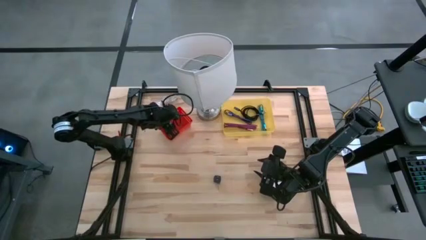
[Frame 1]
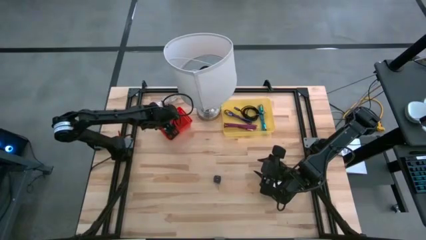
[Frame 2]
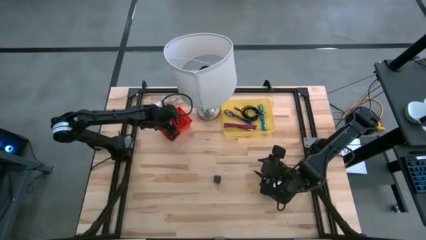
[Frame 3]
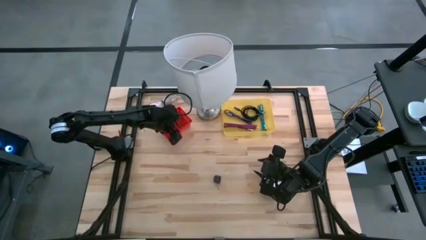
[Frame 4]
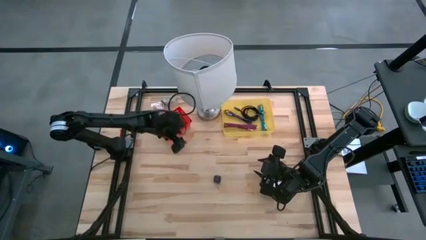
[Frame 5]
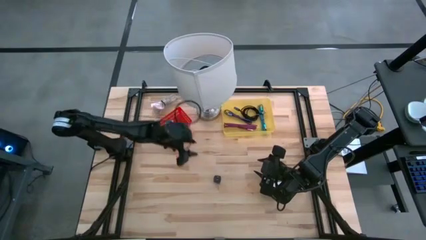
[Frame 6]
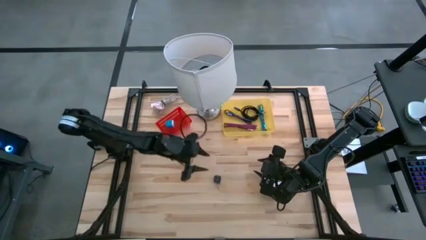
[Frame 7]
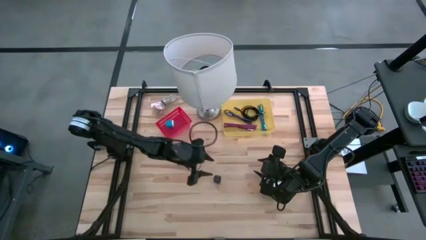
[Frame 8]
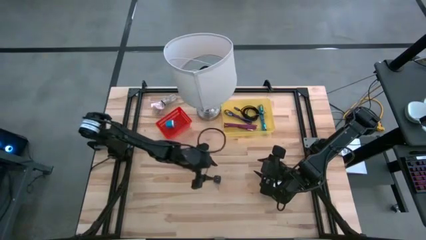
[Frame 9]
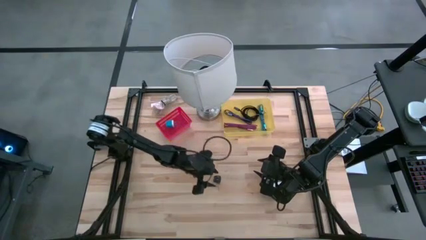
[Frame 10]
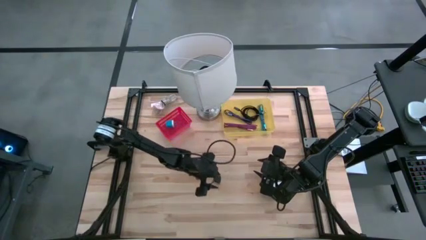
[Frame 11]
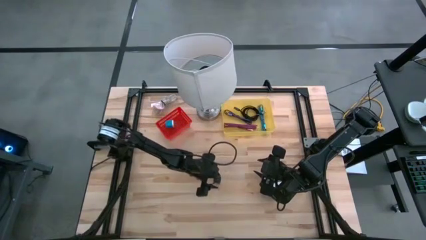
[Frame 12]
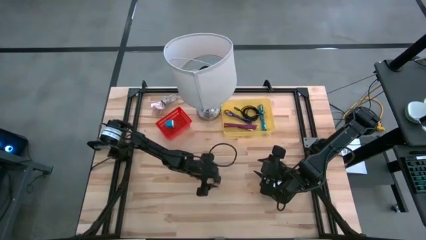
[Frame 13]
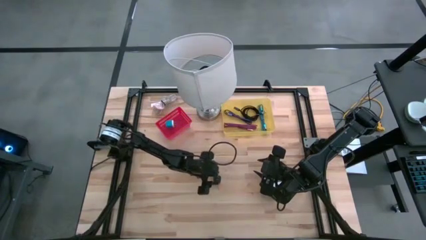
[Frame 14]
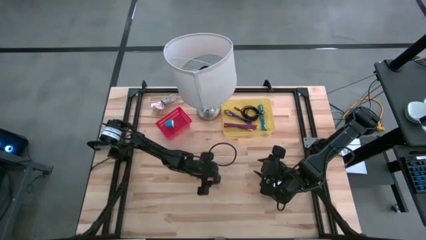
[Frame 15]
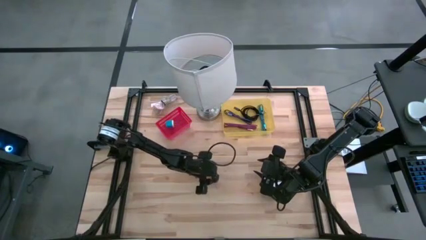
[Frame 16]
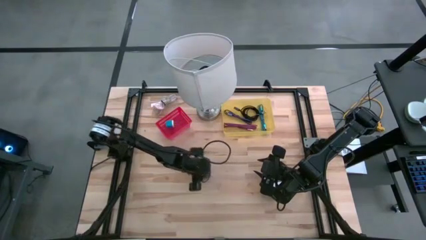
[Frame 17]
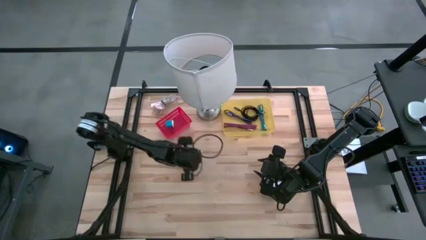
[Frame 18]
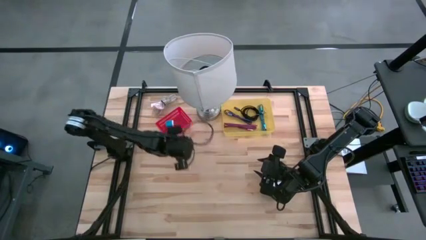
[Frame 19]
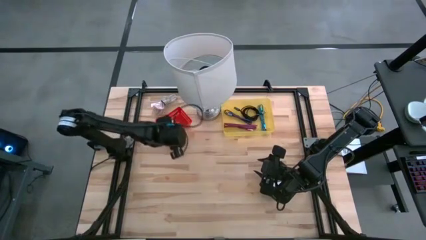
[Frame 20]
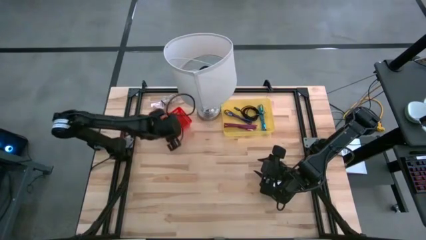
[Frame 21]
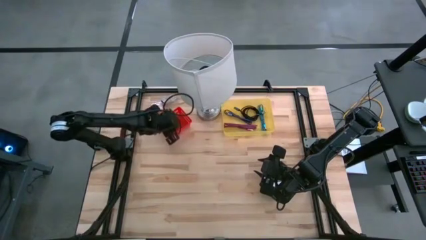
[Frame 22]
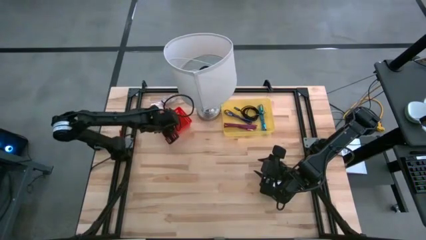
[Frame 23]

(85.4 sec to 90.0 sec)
Task: Pick and place items into bin
Put the black charger adapter into the red bin

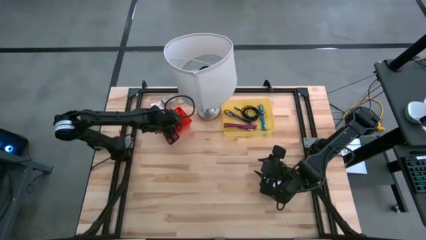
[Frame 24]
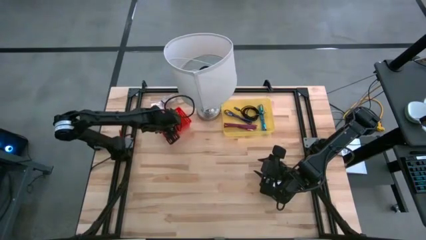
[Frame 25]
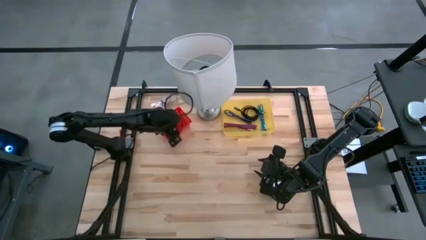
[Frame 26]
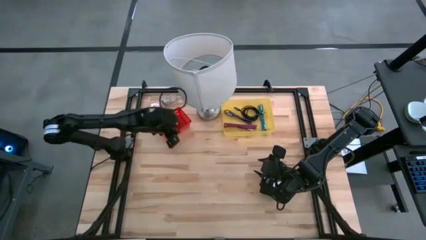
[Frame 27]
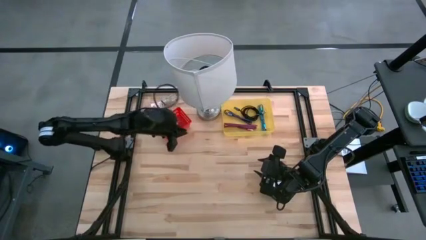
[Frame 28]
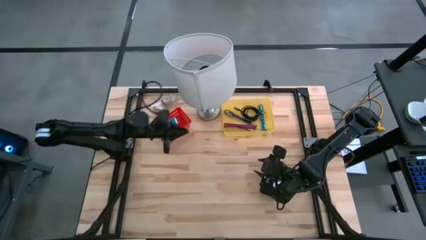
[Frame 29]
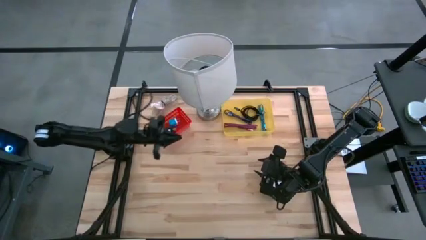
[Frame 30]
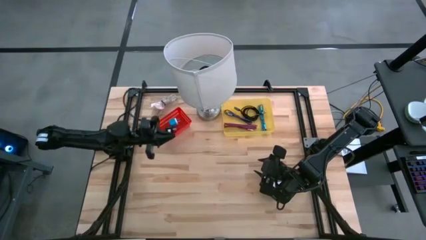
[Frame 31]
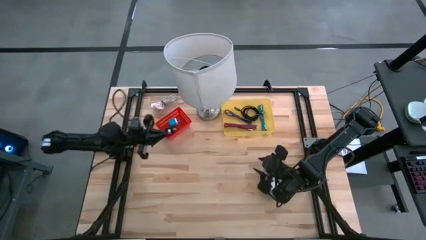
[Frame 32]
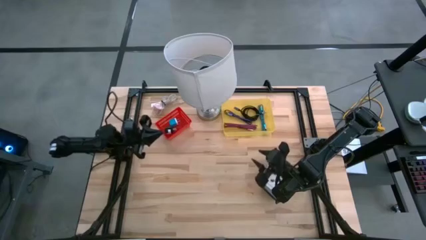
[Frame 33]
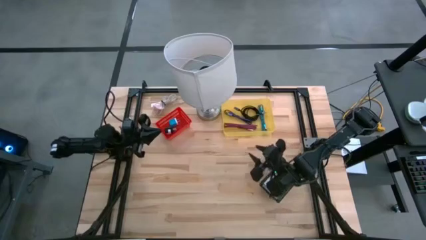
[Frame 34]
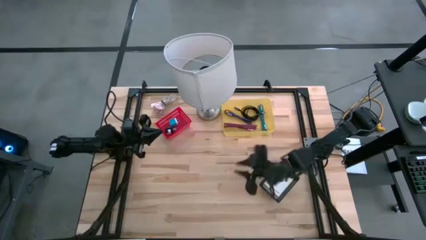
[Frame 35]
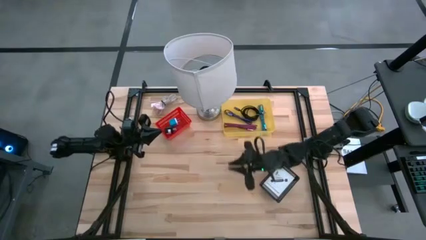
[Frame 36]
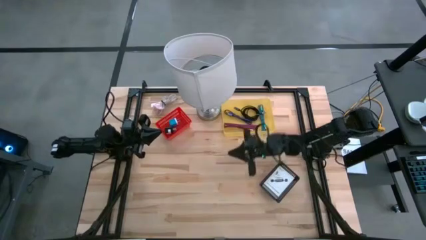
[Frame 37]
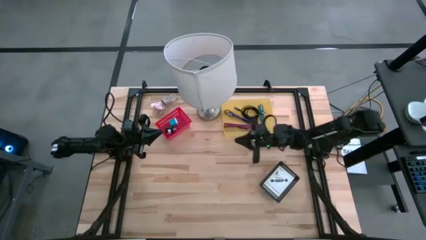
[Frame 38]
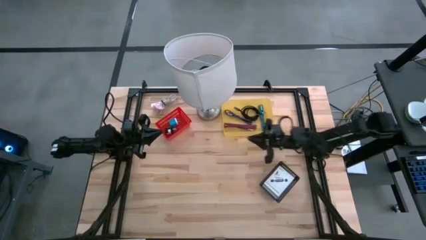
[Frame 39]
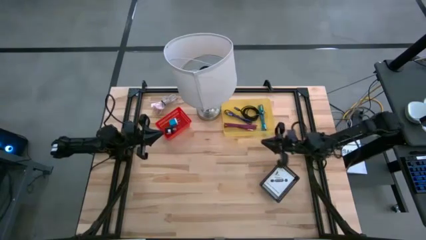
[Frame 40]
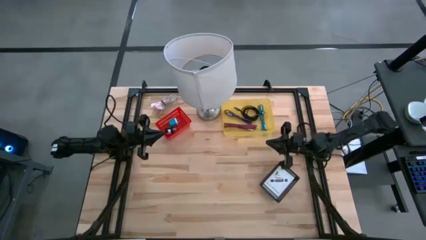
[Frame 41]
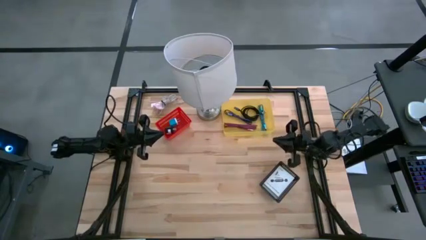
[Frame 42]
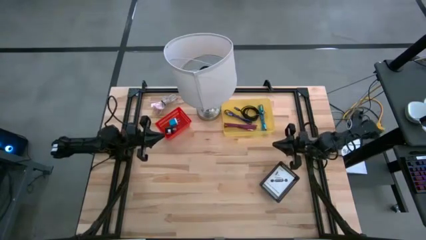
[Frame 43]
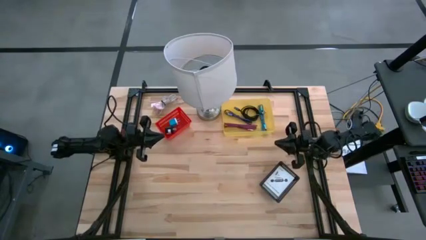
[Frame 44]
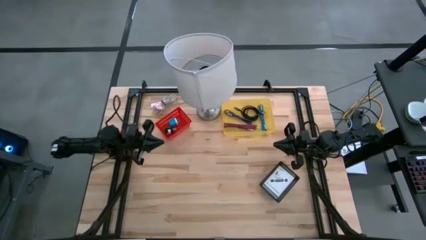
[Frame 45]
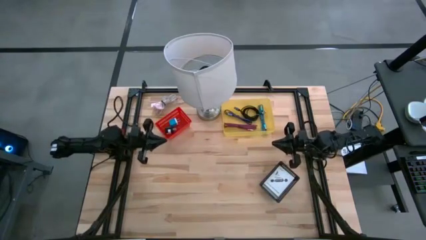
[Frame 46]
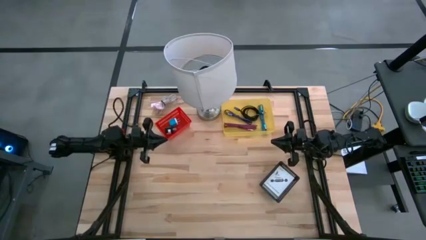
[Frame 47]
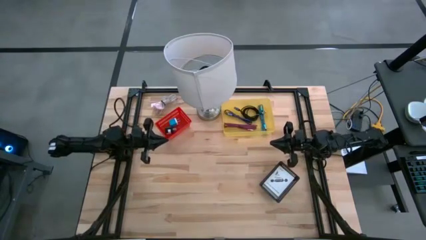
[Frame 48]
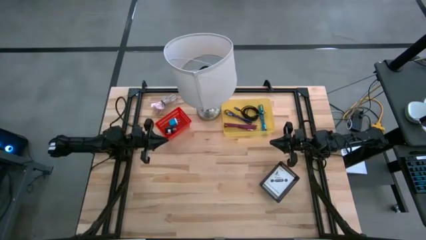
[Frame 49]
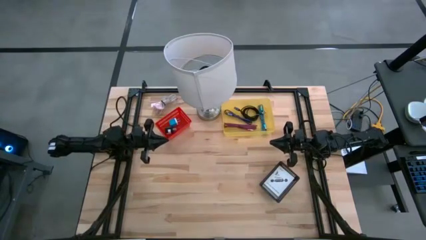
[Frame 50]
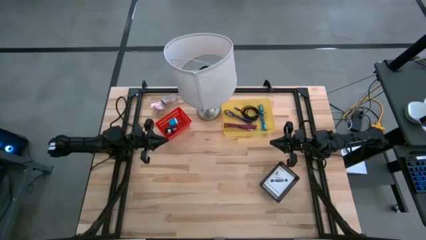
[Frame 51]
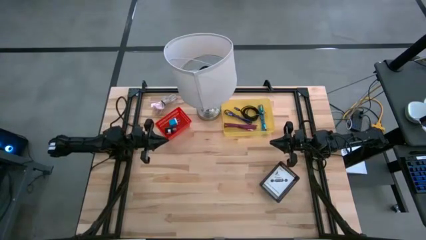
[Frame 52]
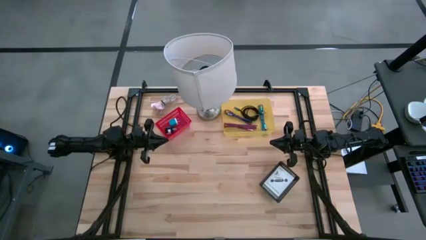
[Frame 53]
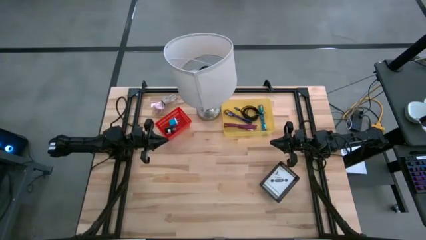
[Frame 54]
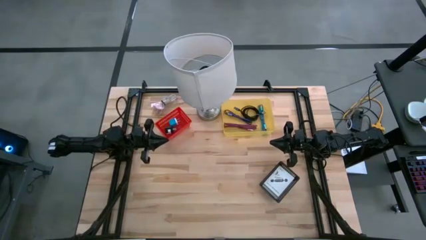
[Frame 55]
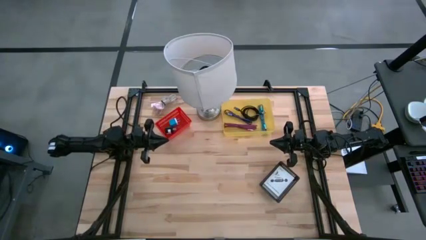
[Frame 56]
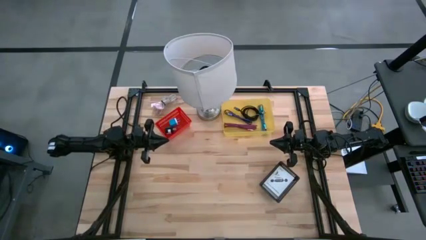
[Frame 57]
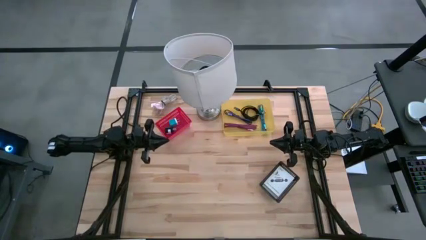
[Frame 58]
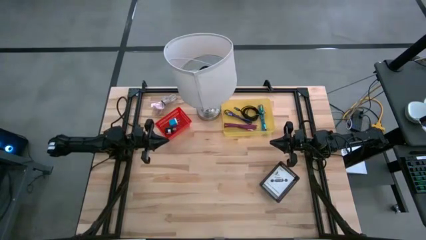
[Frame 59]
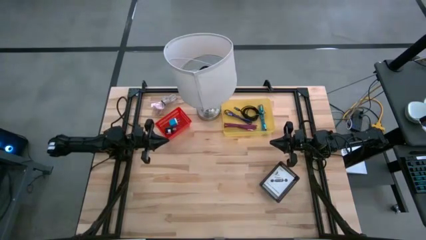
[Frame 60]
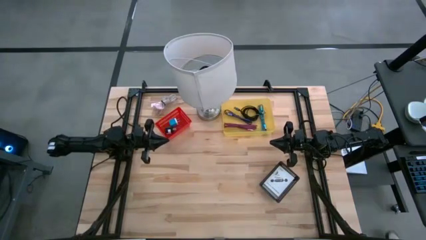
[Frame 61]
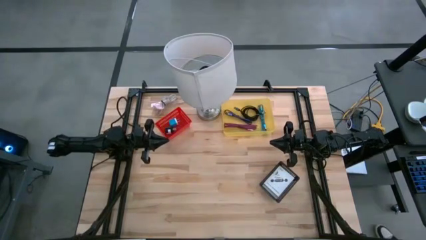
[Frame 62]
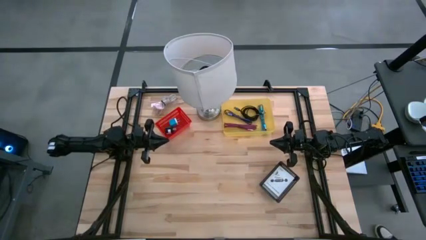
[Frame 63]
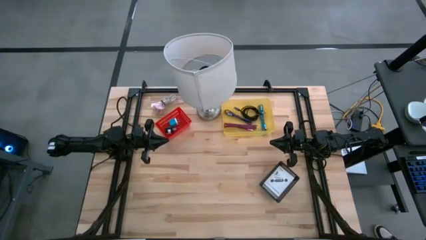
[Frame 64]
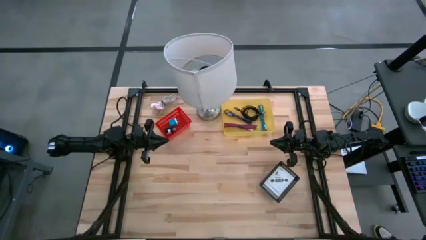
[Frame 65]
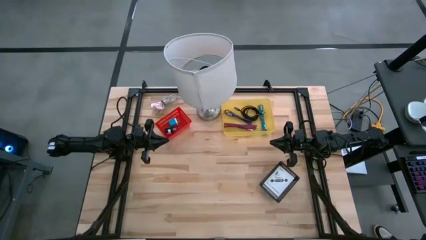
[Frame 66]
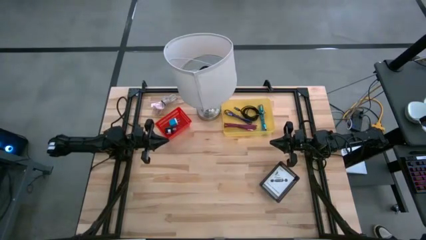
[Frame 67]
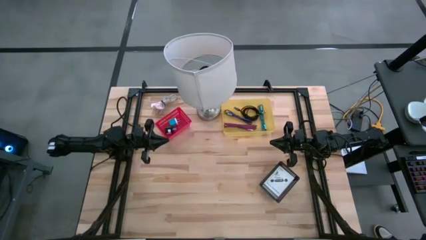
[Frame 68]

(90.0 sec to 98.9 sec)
Return to Home Position

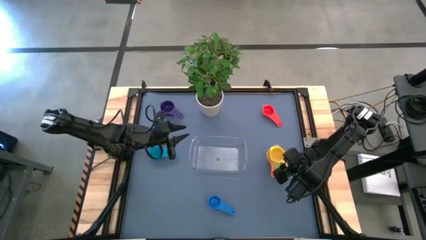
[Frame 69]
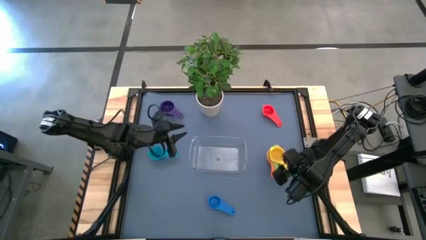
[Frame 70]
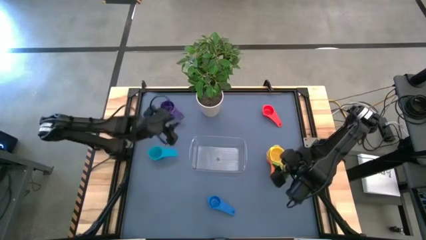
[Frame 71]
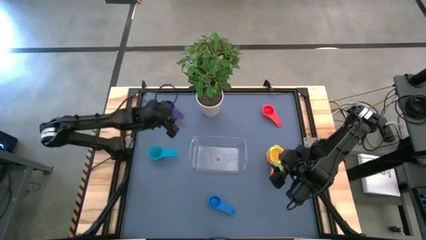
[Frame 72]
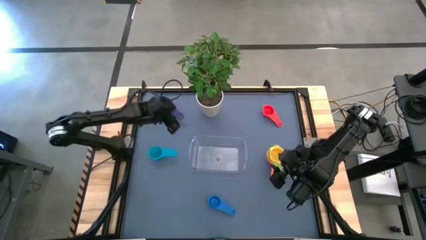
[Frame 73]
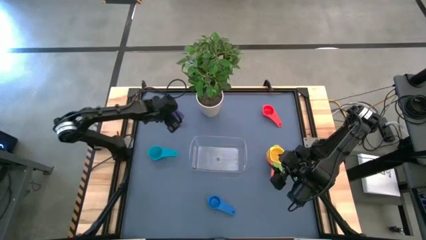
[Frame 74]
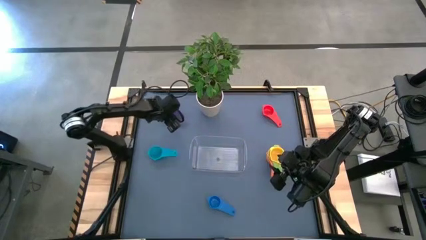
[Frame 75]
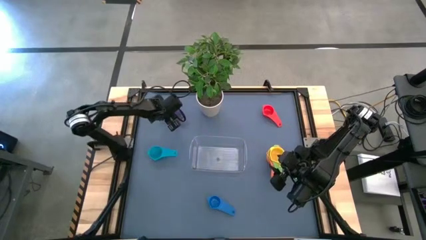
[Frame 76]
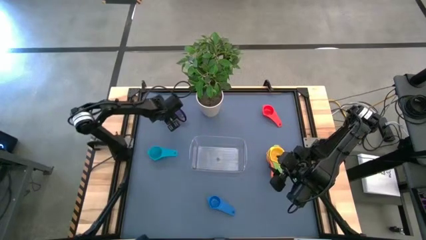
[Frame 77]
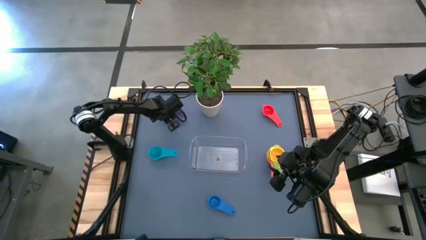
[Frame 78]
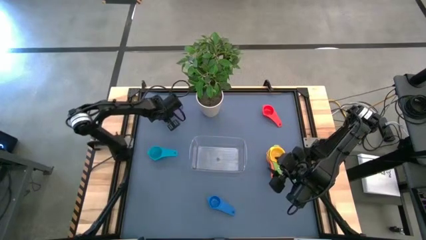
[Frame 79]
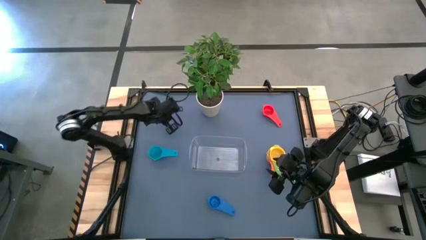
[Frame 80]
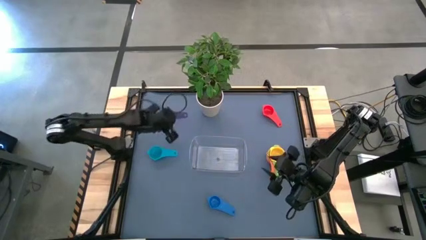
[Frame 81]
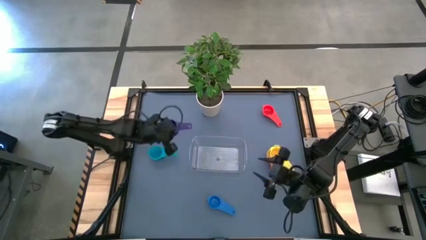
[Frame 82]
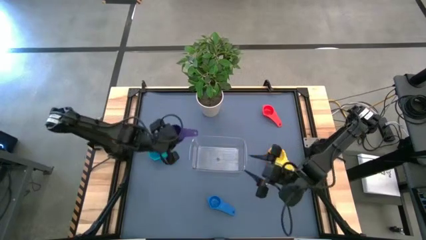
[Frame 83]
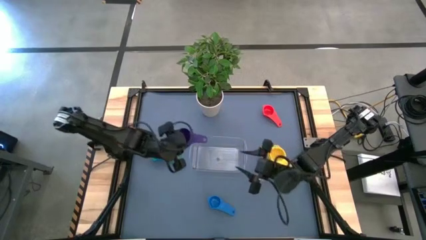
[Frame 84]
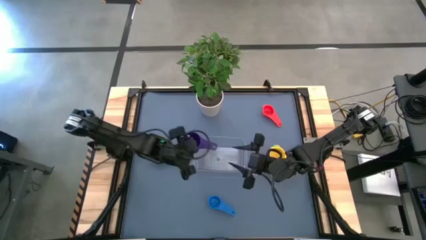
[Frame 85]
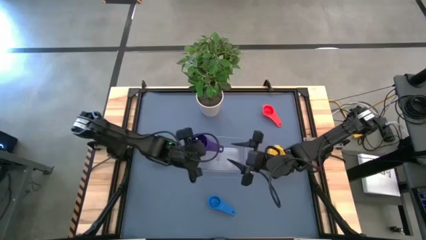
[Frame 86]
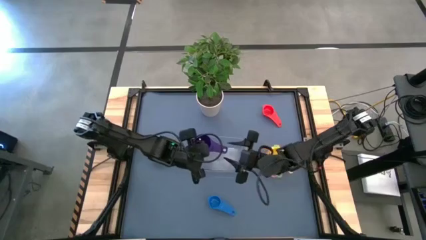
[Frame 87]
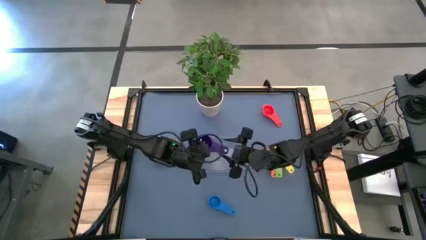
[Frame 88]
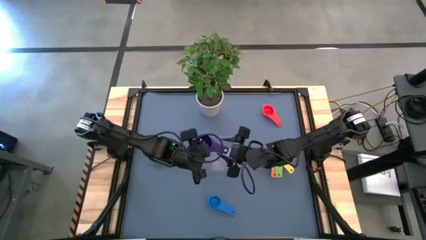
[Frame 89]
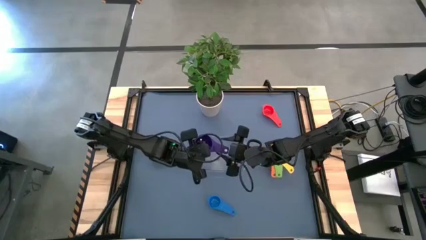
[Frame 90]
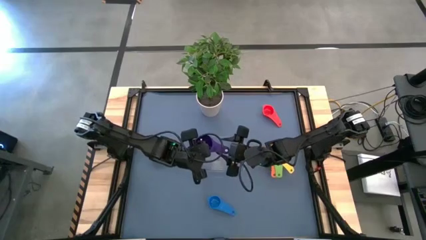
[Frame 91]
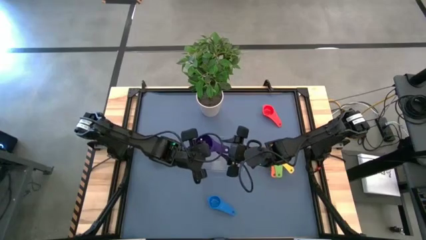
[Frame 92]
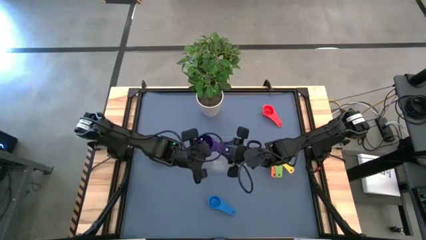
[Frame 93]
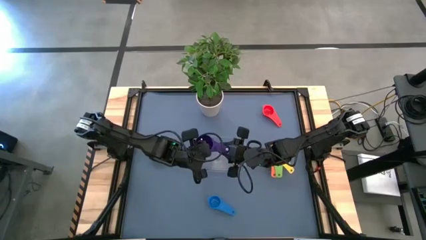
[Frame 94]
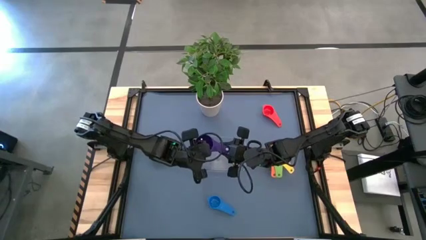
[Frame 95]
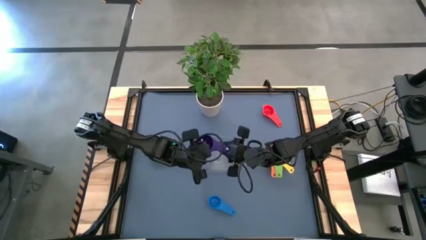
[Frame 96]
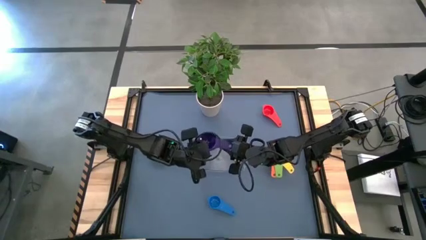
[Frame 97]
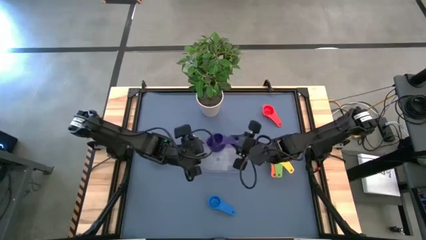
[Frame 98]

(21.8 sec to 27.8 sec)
Task: Nest measuring cups in basket
Stack the violet measuring cup on top of the green measuring cup
